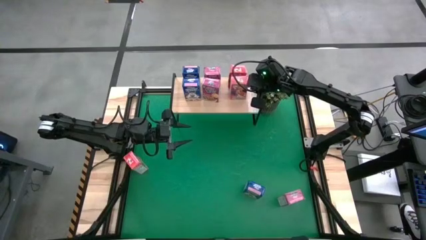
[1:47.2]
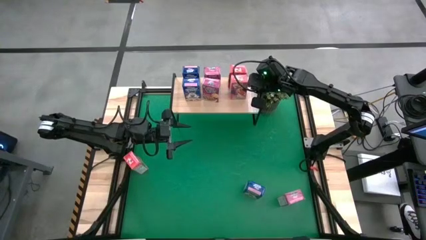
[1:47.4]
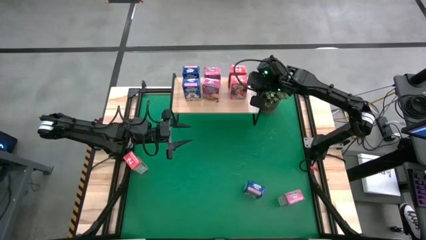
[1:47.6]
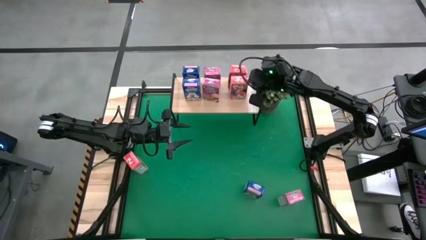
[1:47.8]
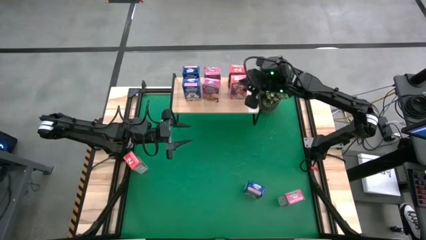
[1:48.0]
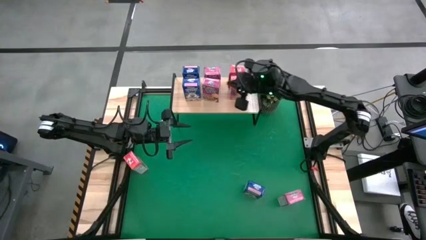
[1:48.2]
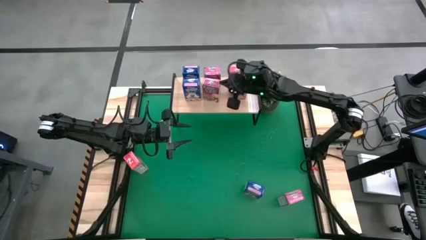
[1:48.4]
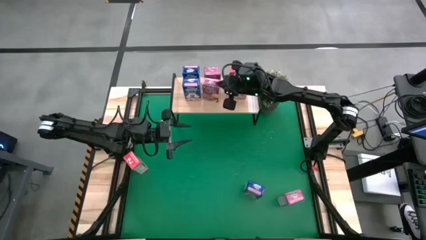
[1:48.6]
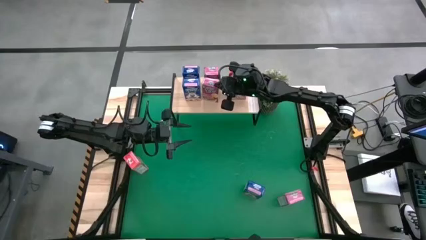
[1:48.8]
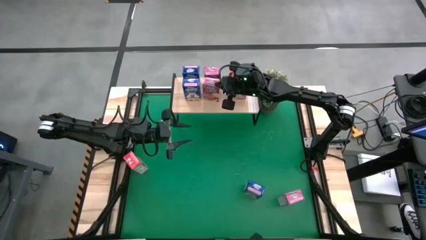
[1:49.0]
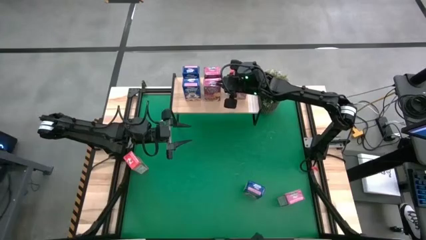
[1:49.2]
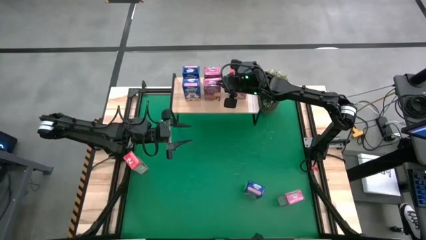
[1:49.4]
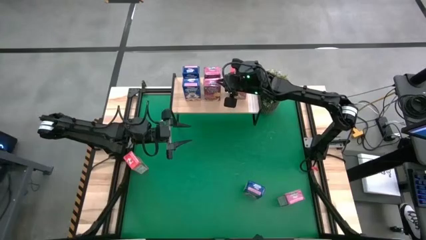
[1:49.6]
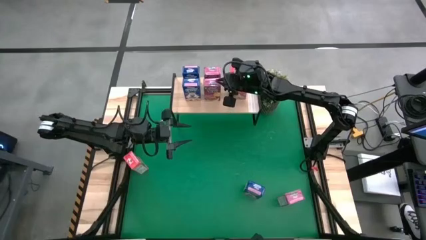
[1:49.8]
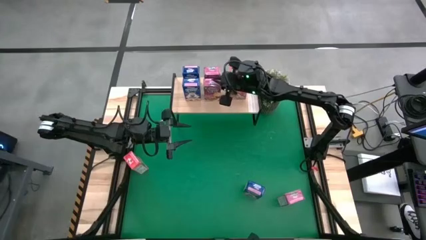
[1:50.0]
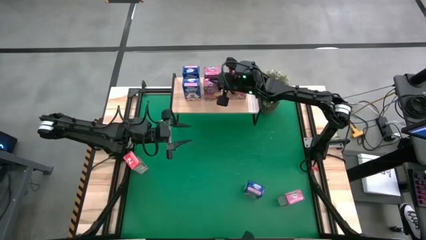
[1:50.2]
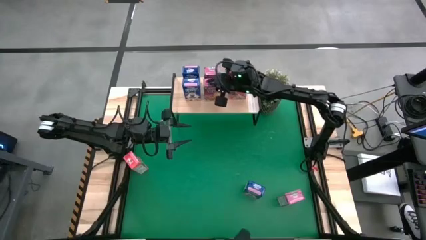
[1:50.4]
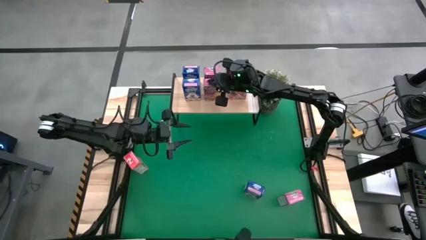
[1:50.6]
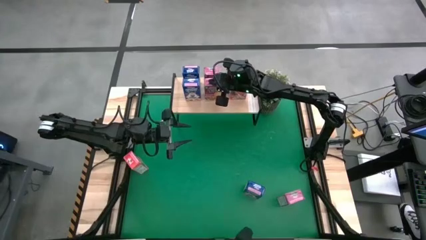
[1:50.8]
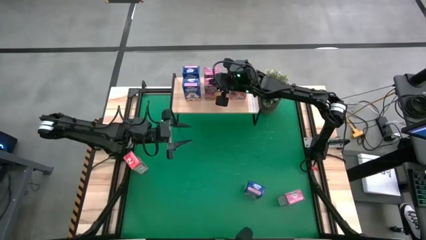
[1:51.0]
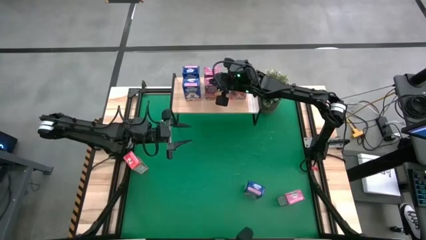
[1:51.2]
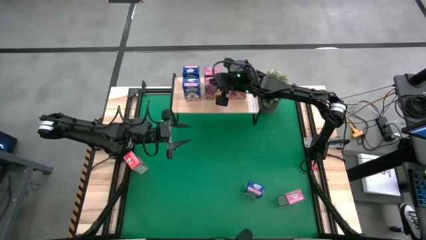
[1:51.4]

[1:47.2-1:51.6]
Task: Stack cereal on shelf
Adjust the violet cereal box on the shelf

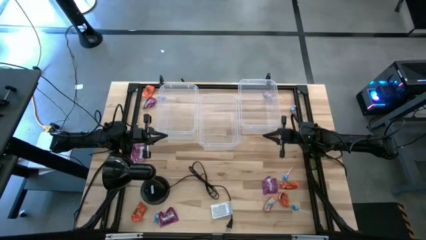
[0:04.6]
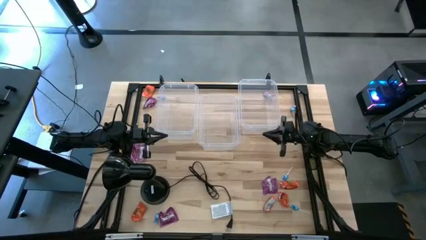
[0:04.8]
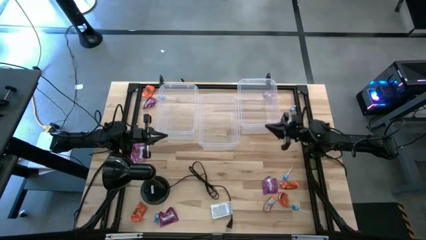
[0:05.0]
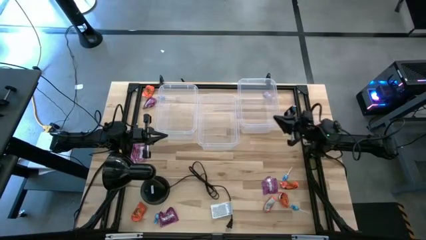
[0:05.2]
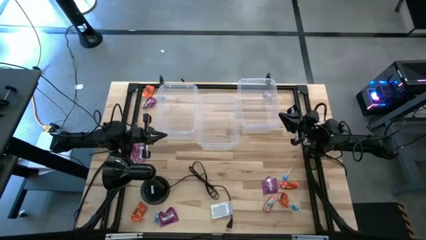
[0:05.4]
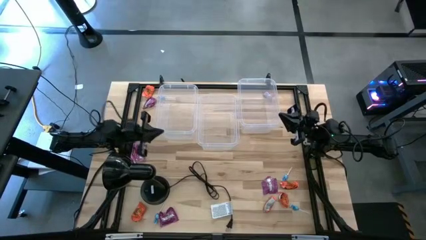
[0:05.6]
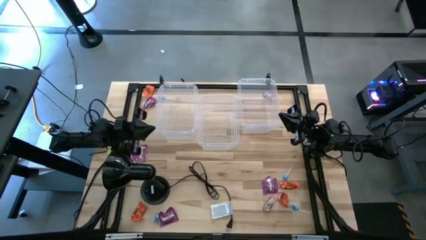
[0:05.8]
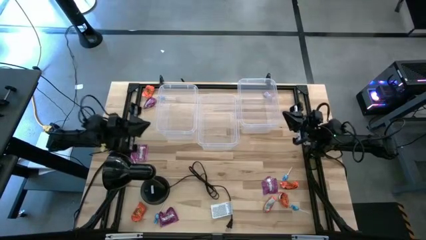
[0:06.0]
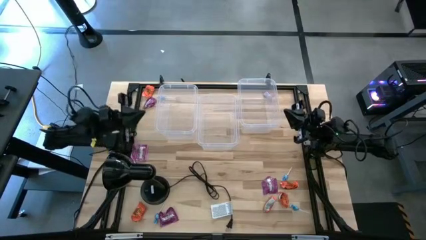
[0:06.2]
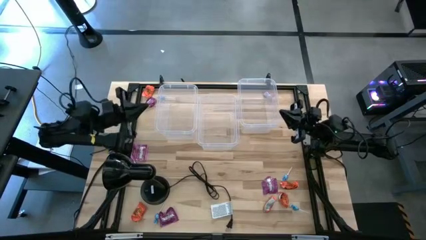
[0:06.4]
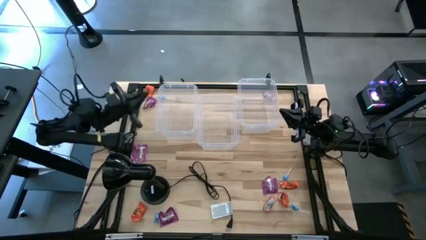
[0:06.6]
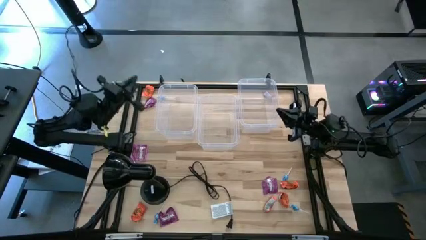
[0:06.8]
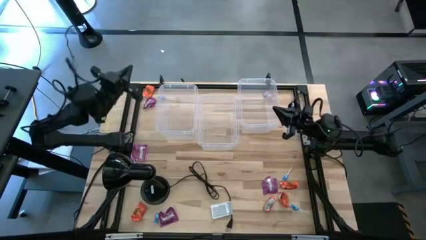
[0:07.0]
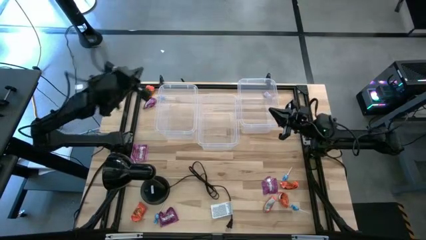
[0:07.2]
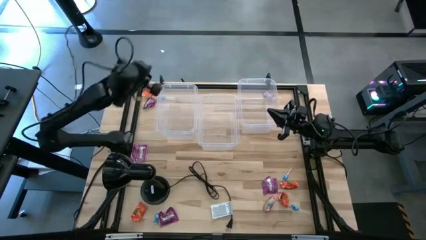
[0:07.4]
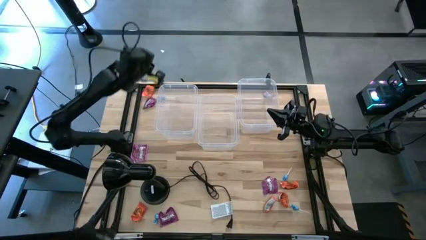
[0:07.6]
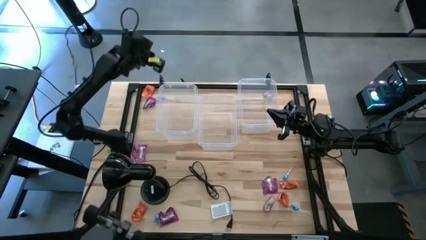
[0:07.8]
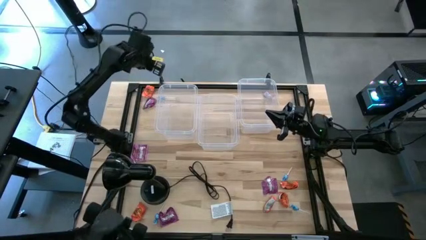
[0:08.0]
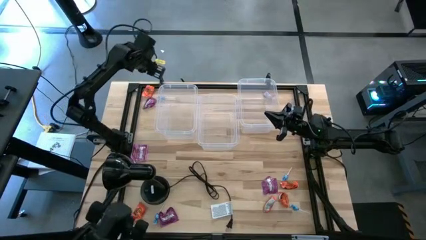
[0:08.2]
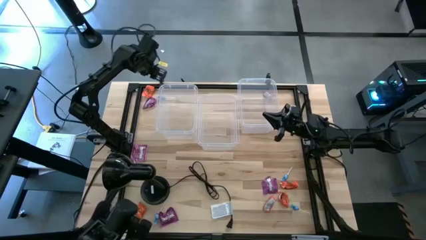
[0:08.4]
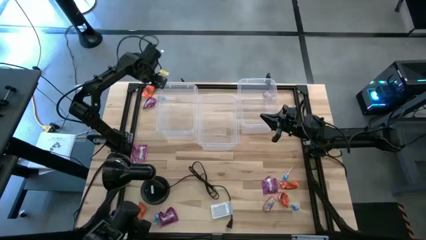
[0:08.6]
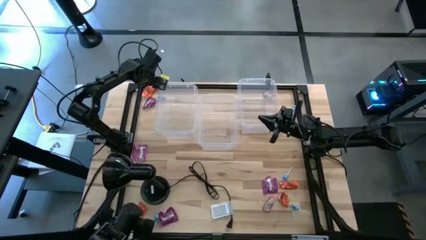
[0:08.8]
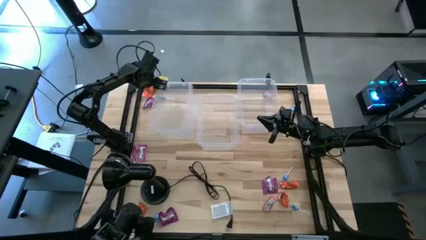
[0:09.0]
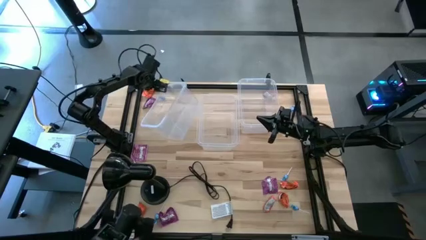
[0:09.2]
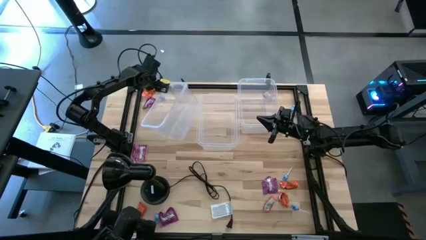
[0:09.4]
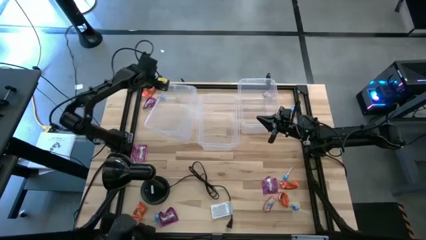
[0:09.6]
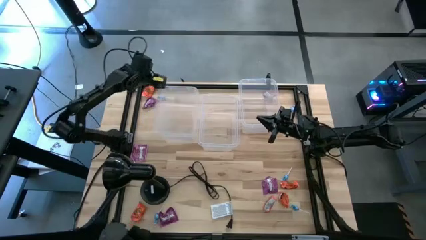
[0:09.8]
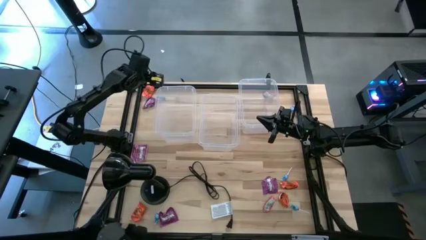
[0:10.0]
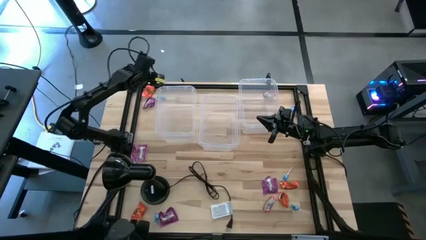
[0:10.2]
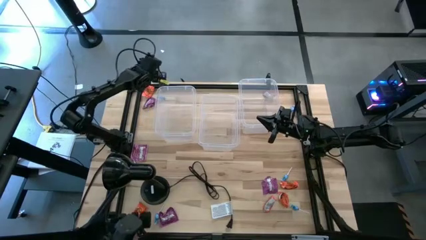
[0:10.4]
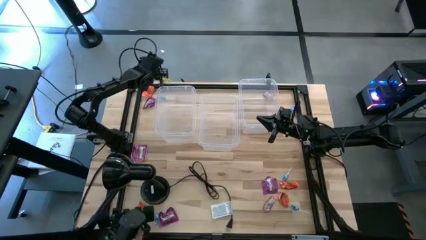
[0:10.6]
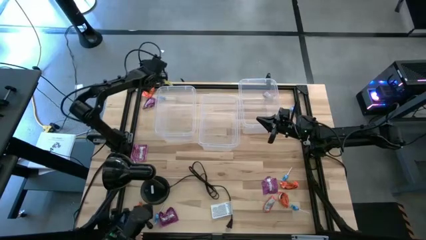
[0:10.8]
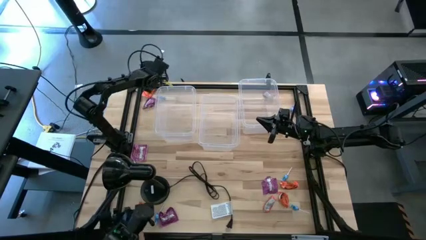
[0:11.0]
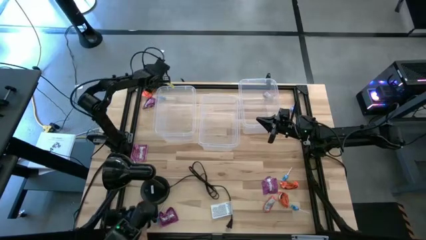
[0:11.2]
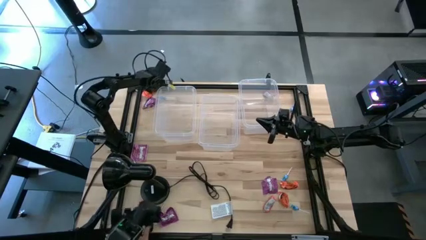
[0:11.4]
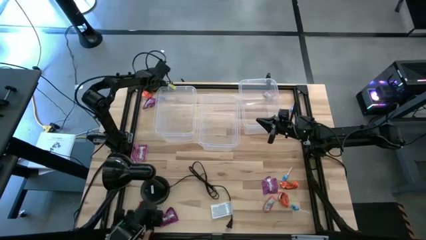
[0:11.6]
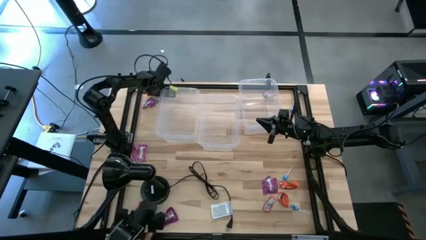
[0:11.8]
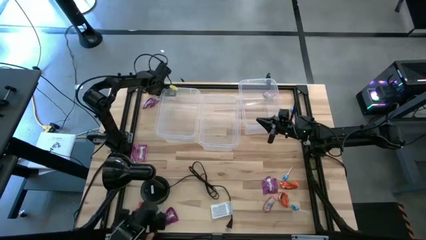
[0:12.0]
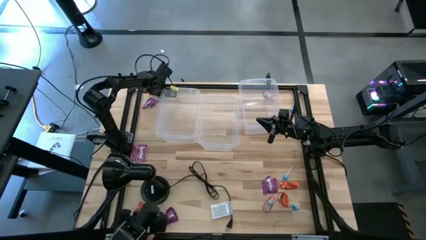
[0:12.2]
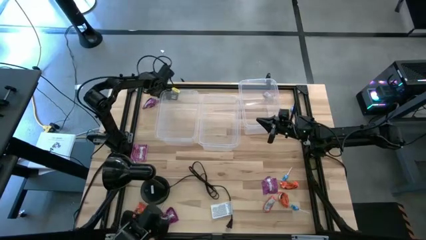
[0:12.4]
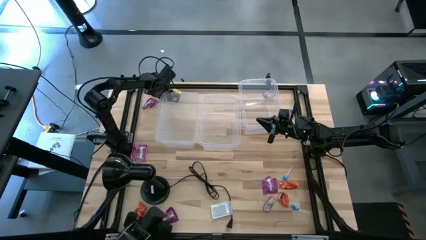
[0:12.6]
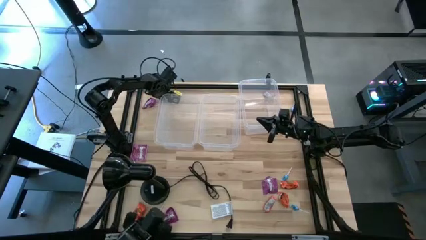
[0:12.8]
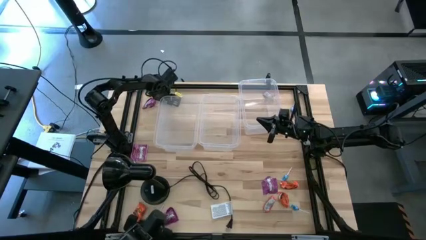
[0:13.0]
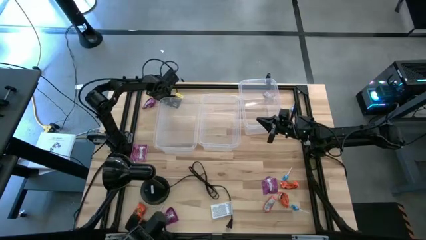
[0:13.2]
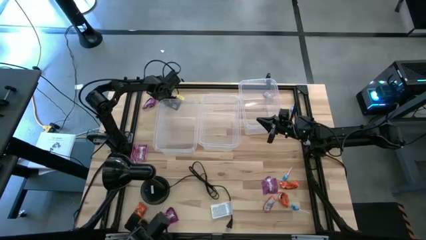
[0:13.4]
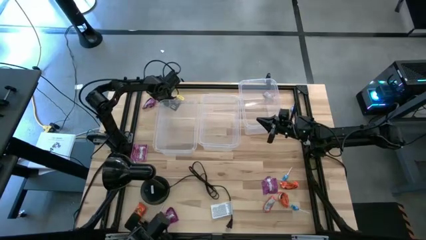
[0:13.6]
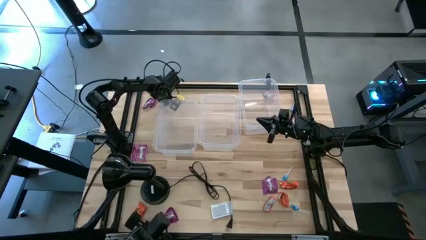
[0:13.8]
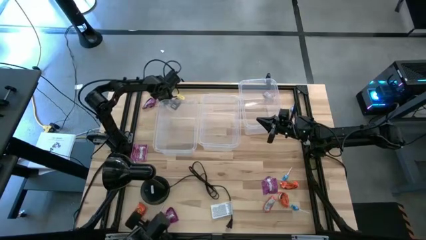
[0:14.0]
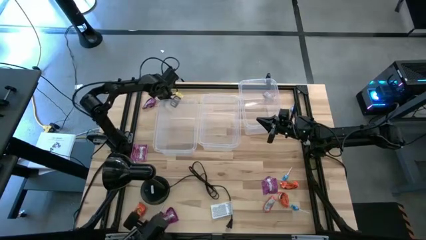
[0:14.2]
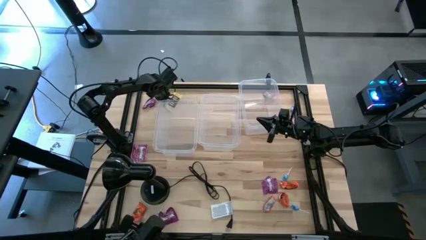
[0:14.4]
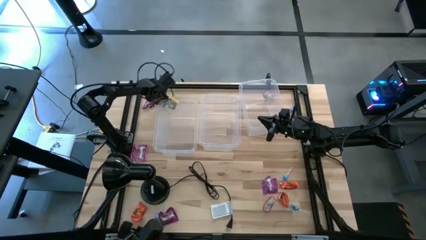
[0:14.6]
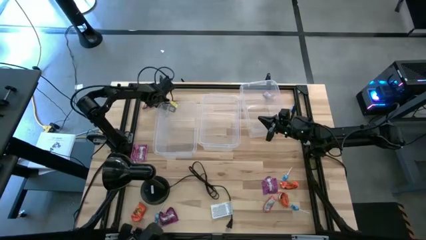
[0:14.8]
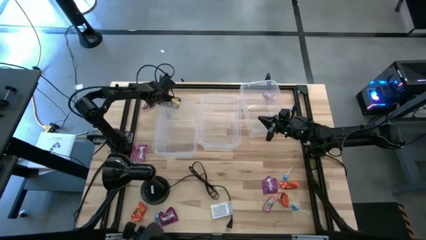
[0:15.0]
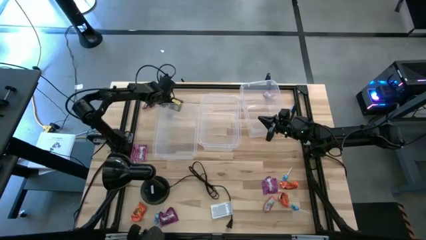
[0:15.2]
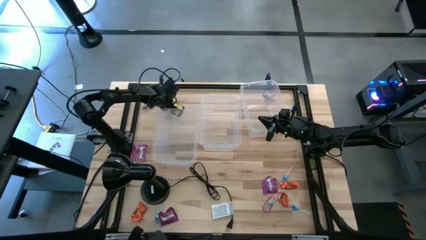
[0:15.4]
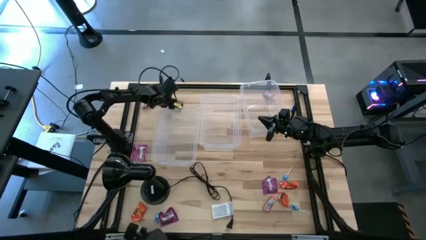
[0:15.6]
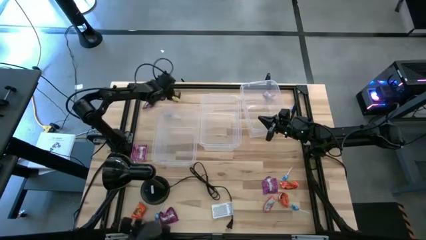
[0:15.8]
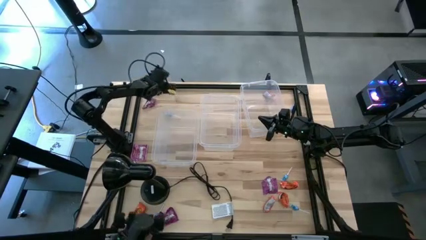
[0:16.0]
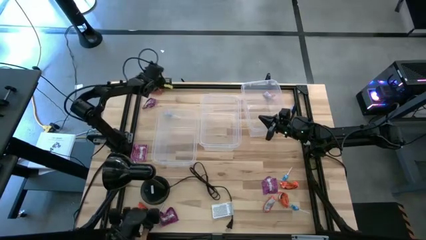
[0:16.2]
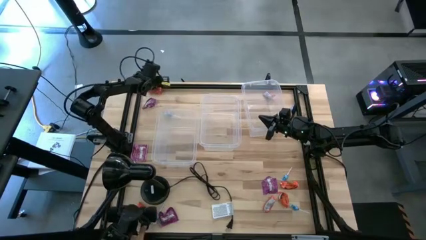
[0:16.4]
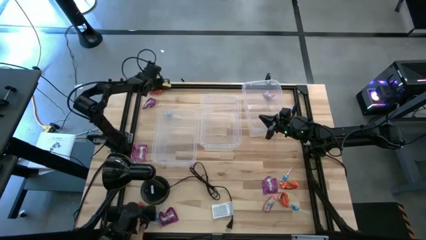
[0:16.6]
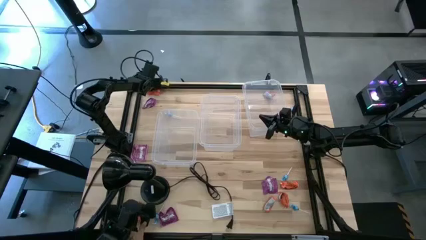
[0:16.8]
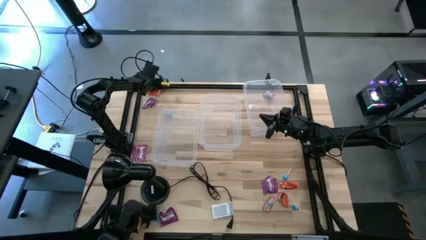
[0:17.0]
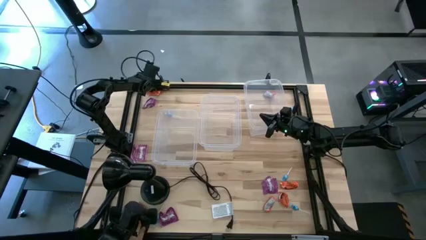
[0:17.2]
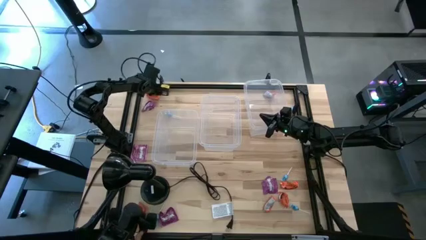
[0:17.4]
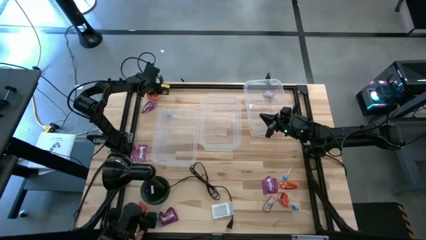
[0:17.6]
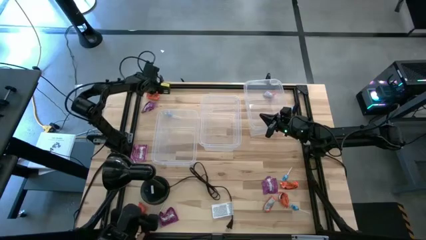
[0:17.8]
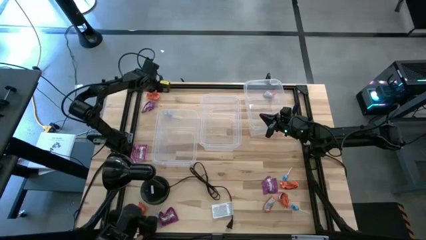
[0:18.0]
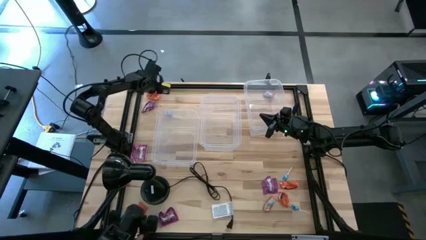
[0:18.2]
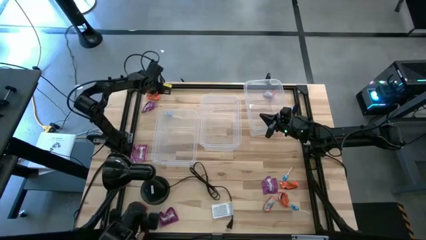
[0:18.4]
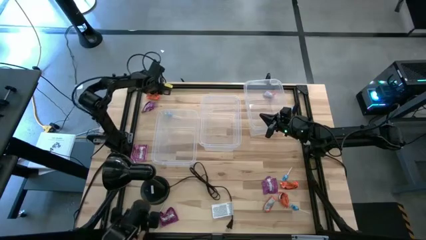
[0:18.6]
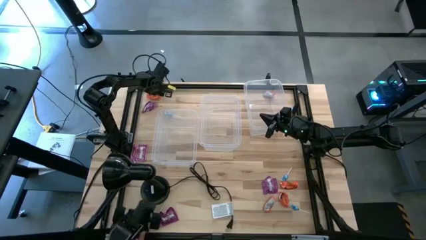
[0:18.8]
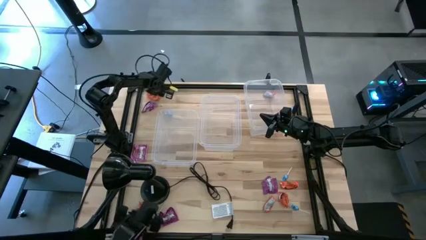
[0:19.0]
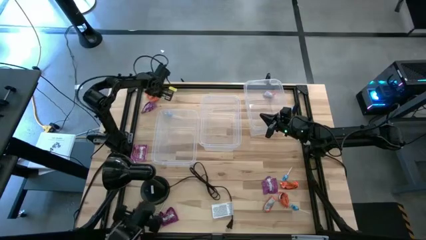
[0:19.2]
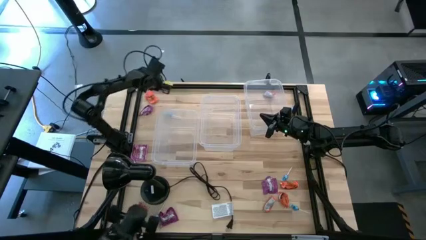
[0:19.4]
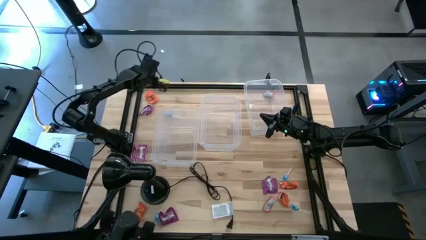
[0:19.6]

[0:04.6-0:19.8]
Task: Sort candy
Put the orange candy into the left transparent bin
